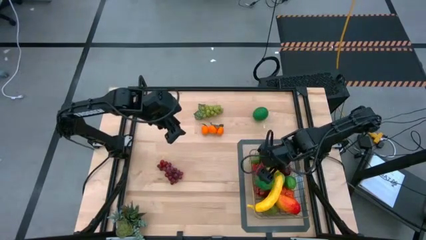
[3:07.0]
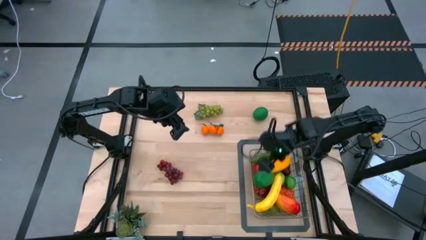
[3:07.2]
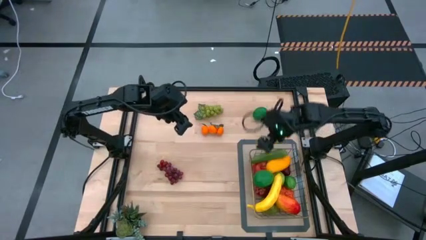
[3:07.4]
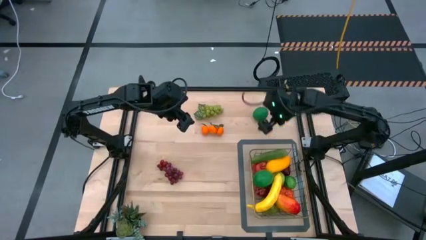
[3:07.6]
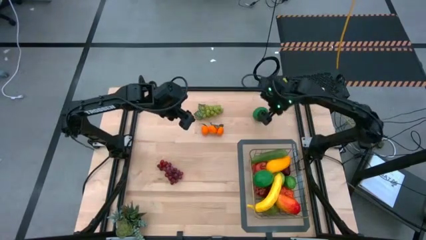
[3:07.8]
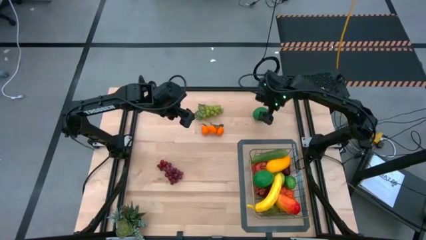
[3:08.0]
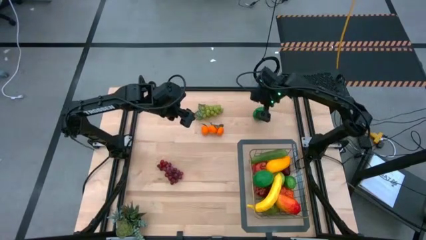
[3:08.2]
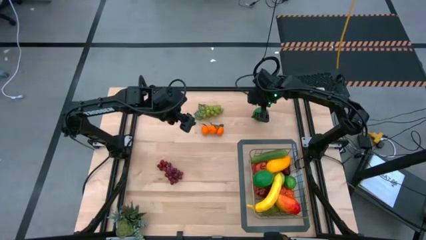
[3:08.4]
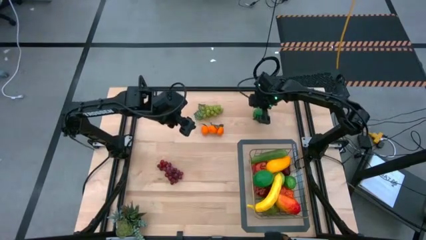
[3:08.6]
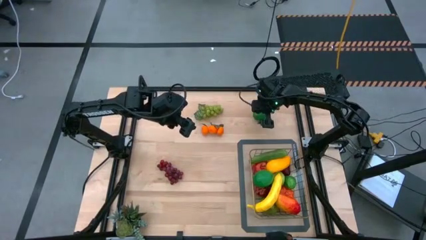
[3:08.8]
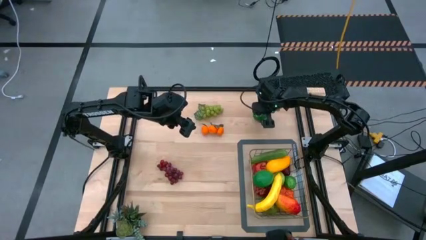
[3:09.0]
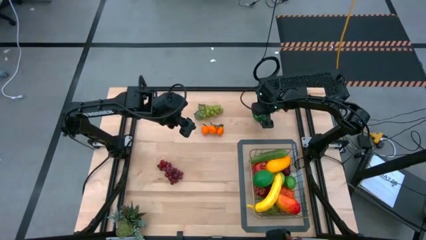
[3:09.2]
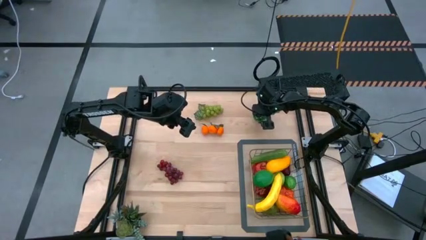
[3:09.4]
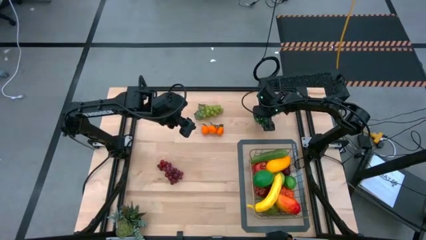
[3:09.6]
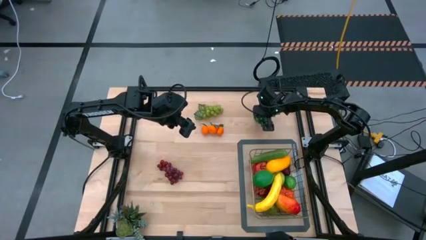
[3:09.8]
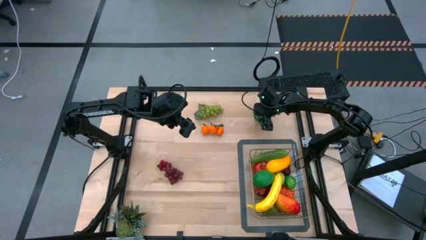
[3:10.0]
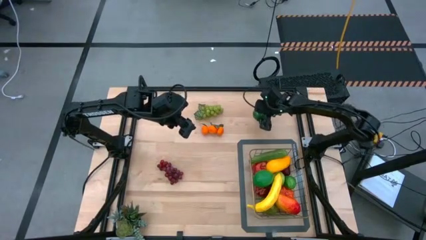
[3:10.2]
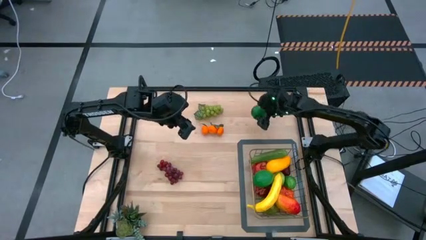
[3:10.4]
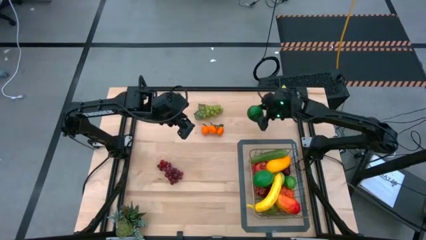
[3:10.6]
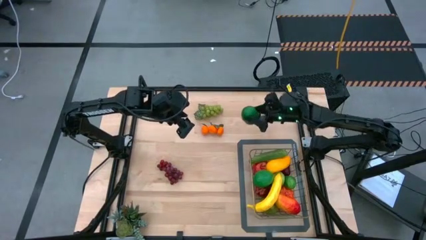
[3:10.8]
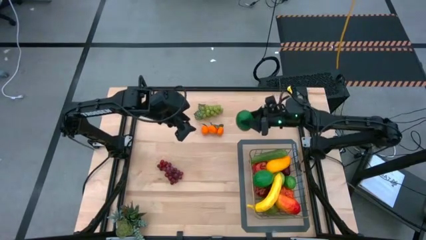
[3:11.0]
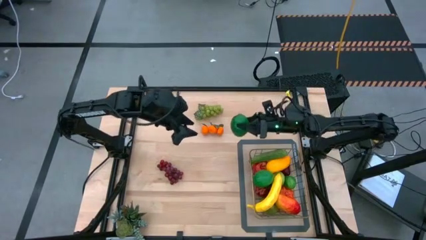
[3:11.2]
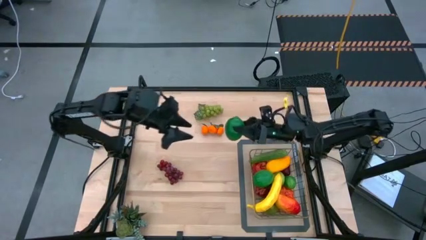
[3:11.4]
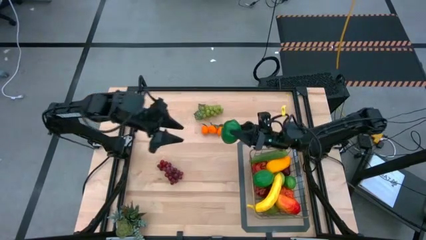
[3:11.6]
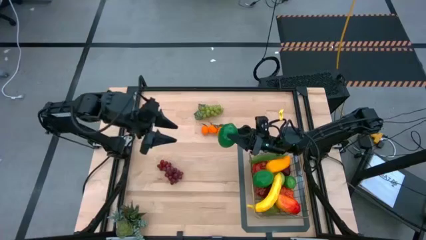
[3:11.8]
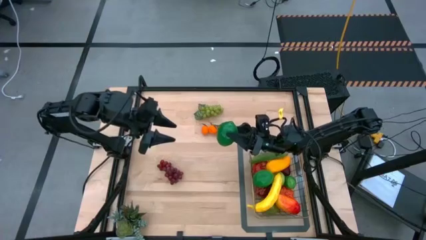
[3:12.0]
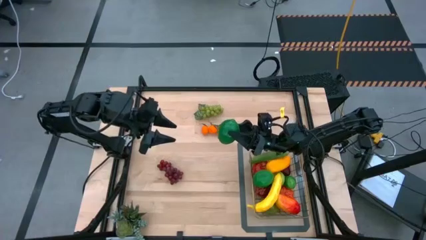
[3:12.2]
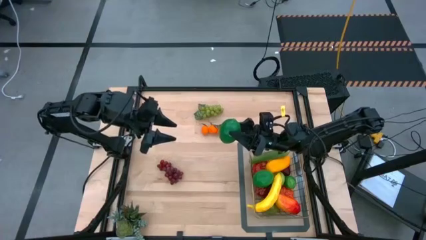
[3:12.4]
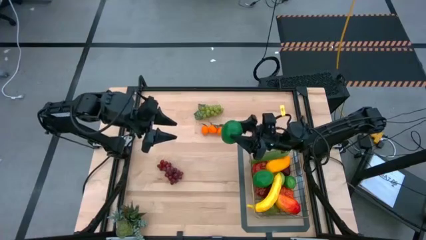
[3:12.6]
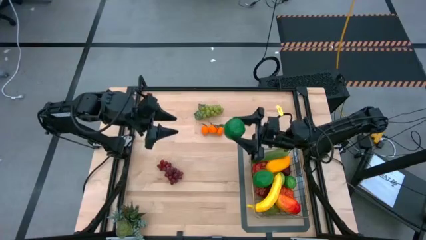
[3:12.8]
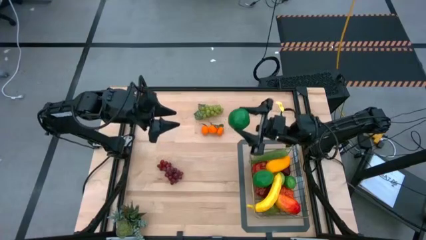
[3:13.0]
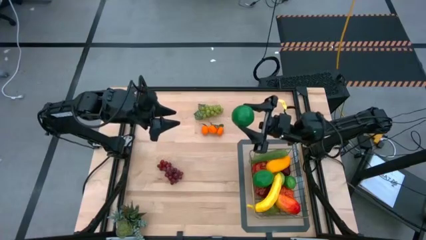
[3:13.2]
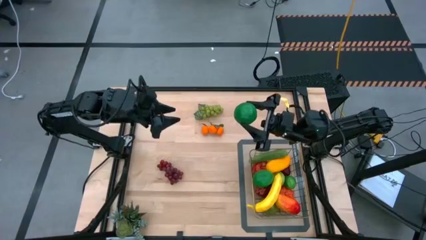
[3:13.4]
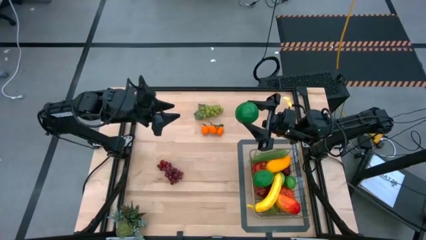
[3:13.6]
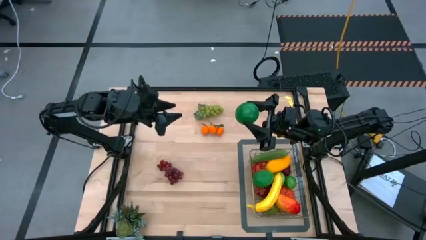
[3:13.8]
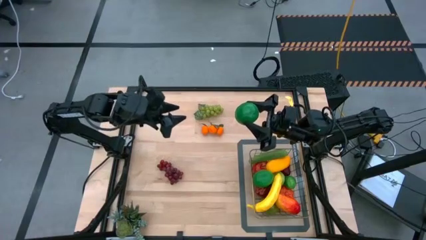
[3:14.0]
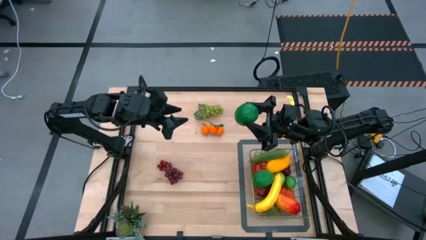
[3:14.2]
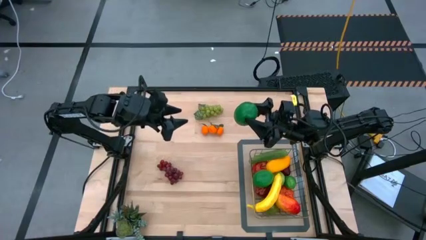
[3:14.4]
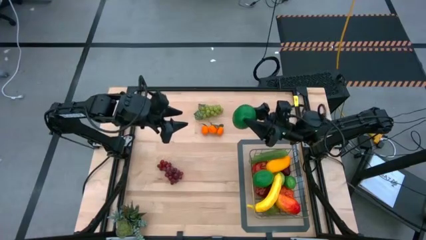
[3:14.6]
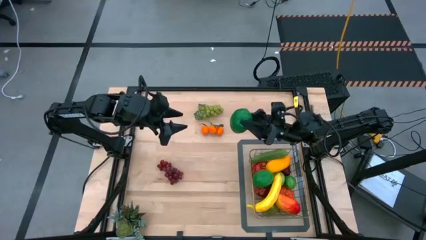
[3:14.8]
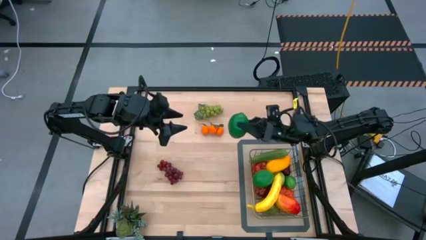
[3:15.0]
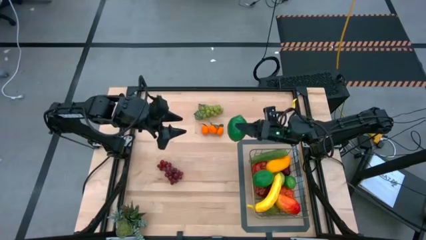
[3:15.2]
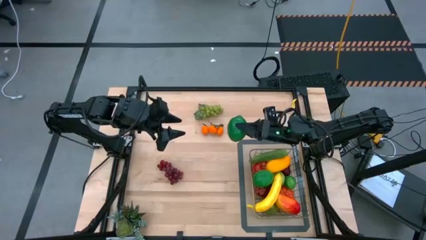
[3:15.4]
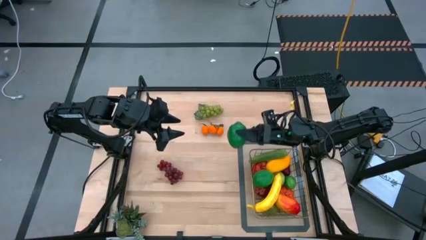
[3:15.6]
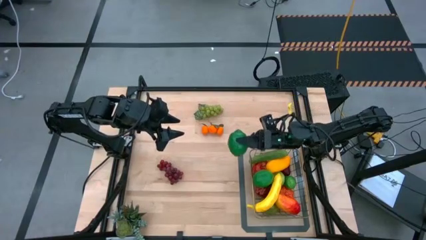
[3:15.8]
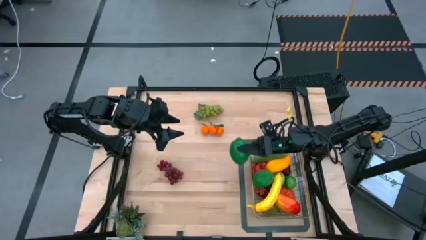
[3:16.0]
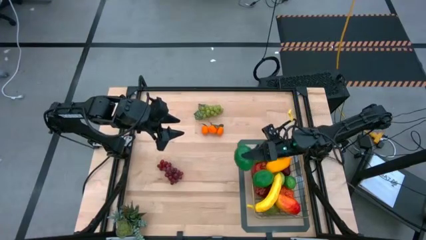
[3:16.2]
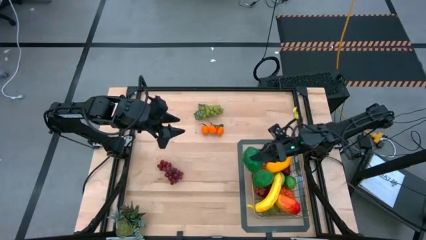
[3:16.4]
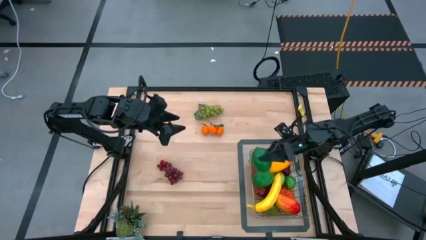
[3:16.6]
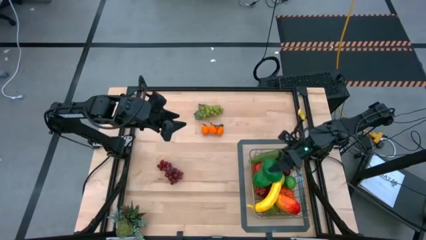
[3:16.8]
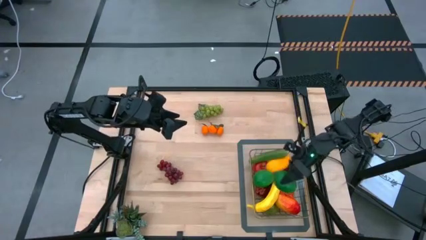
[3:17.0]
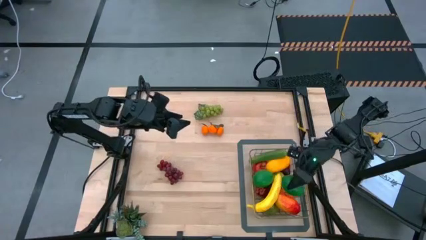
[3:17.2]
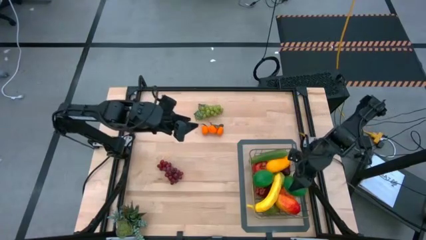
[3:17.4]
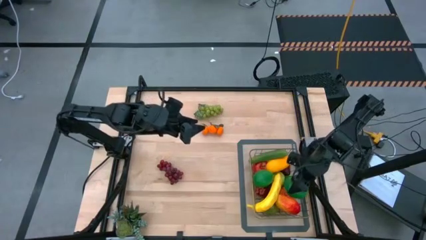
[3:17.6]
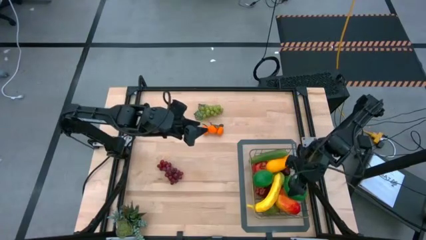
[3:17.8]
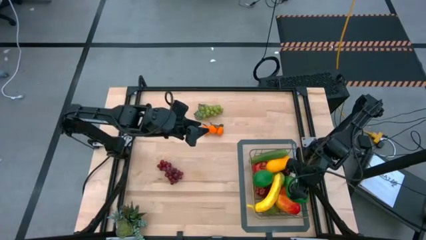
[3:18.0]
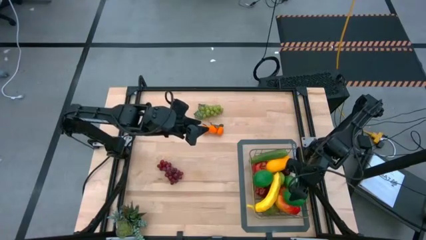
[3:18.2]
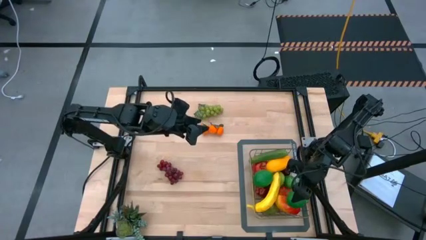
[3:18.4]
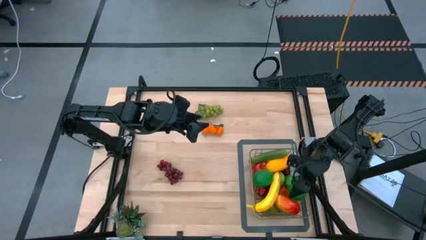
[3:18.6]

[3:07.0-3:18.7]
Task: Build produce basket
Put the green lime into the wire basket

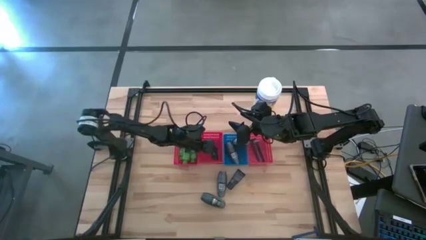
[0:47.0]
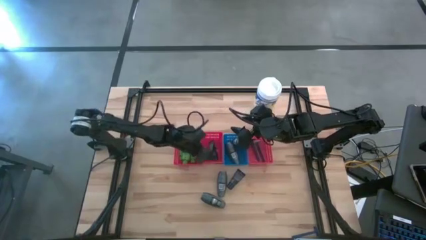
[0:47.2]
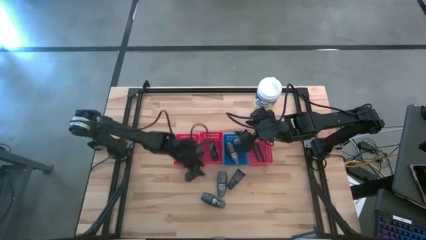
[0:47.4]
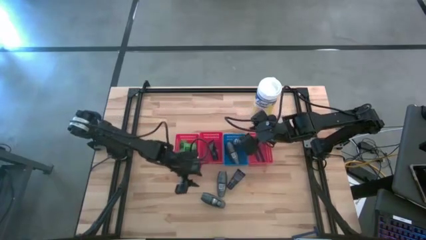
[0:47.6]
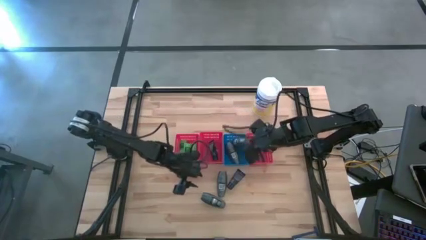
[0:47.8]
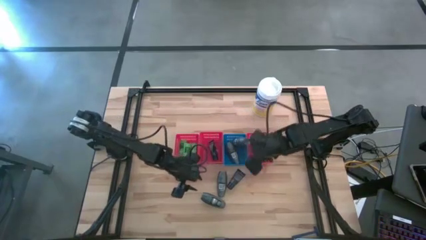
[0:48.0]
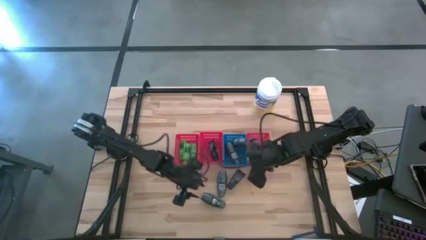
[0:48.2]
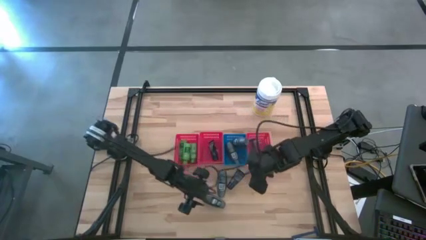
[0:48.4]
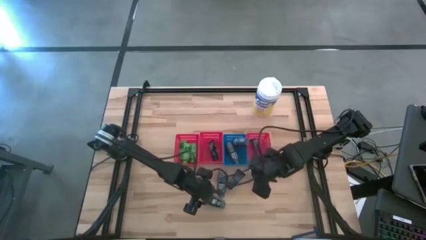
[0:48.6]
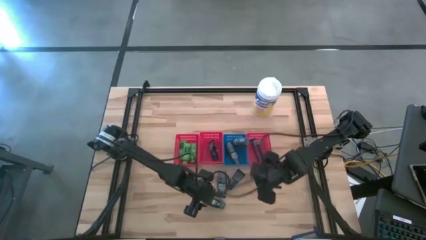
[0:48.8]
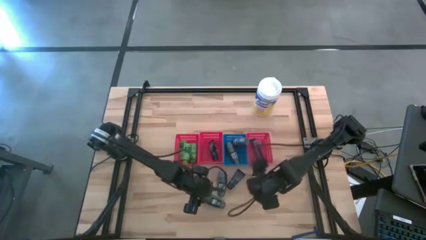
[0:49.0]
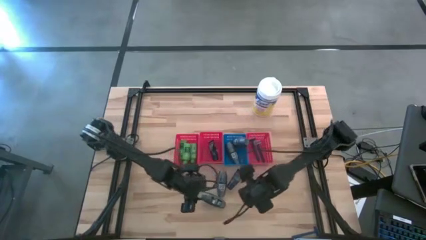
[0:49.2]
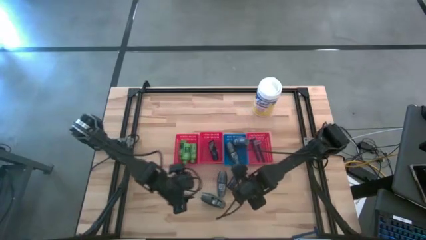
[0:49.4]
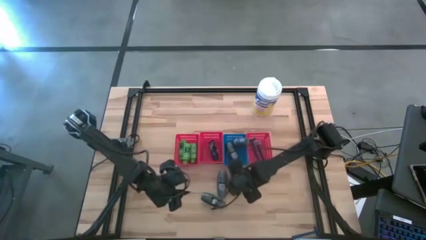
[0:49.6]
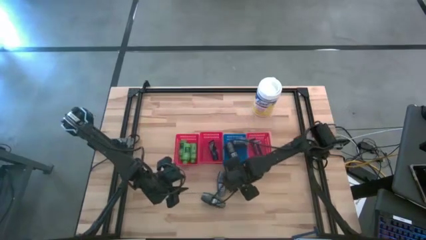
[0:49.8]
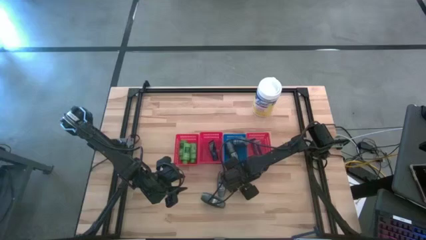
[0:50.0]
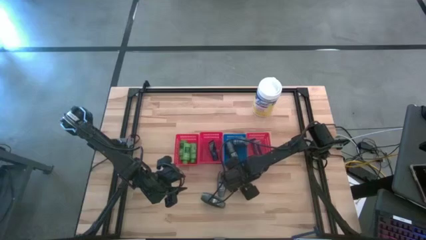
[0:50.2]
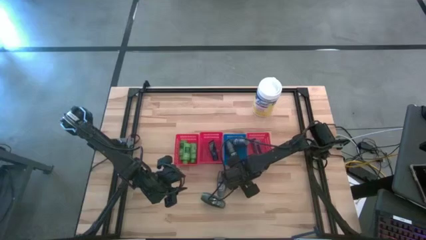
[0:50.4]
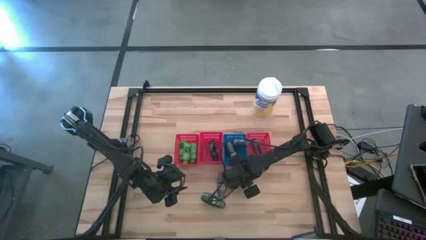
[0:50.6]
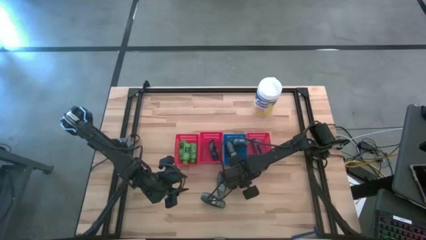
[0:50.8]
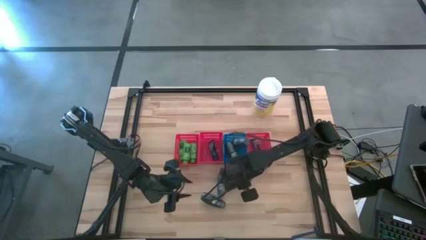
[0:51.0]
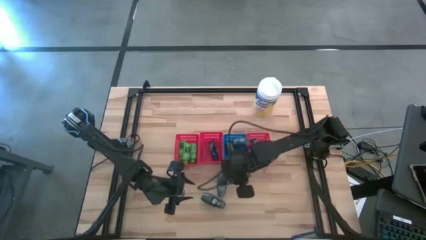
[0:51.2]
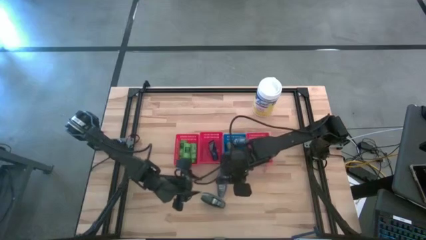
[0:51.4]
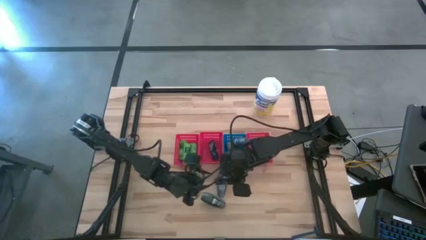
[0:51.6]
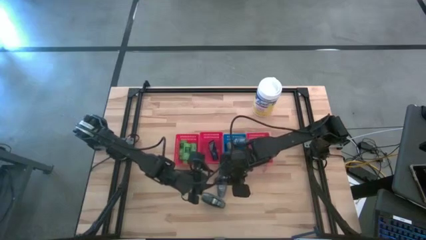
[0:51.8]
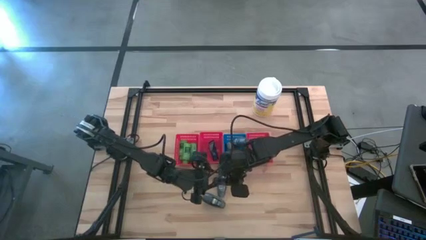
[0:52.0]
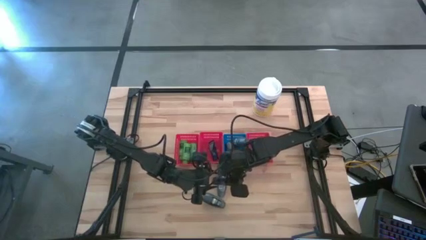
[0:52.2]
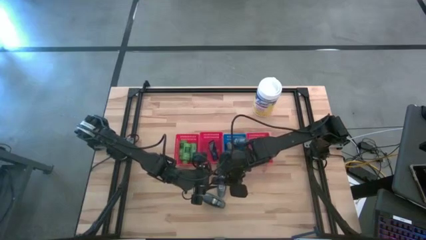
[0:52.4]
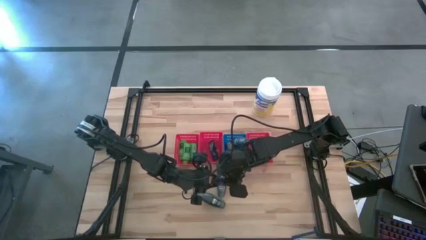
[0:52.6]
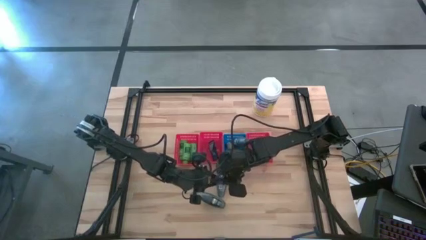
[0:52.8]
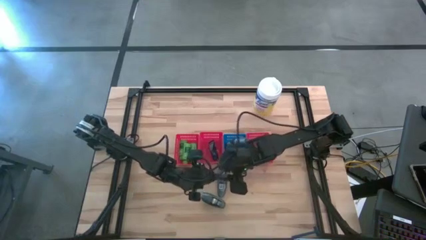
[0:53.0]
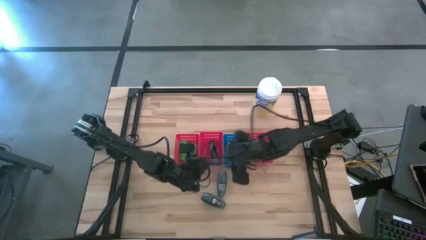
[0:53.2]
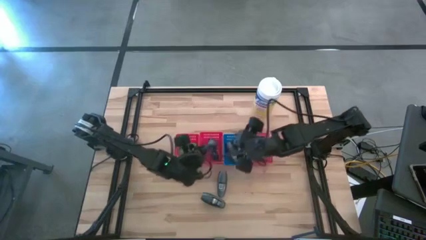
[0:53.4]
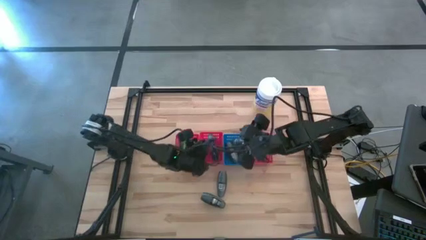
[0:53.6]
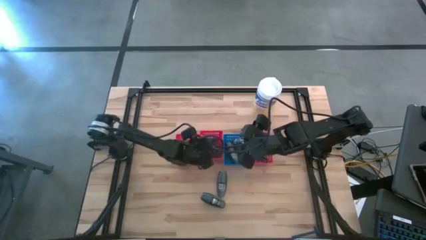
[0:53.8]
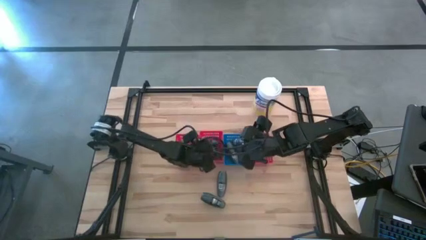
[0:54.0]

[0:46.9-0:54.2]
Task: Pick & Place Travel size toiletries
Put the shave cream into the middle red bin
